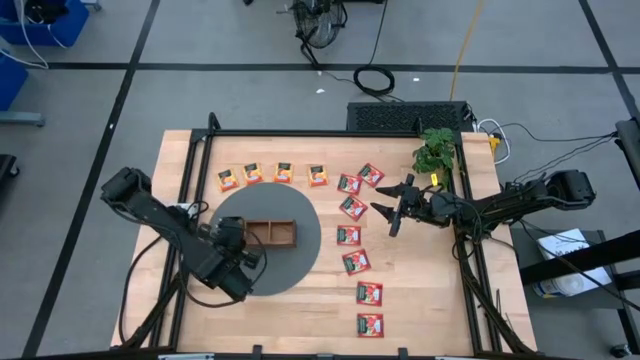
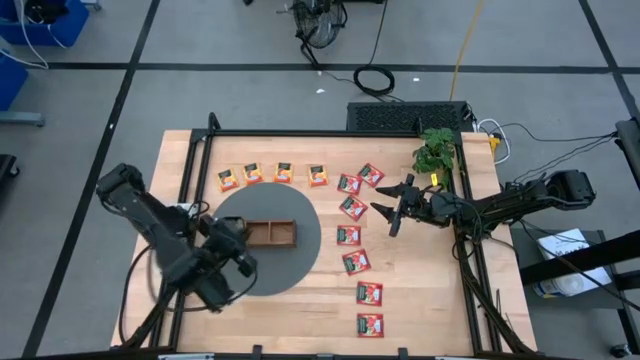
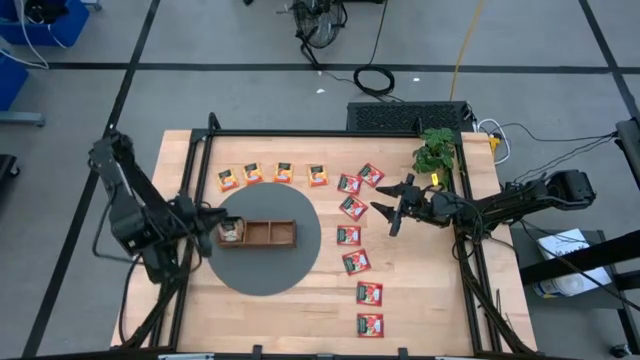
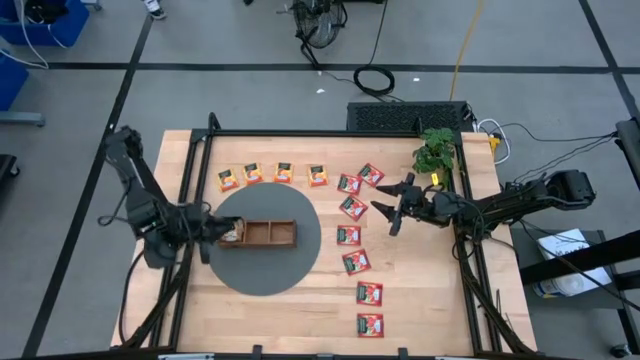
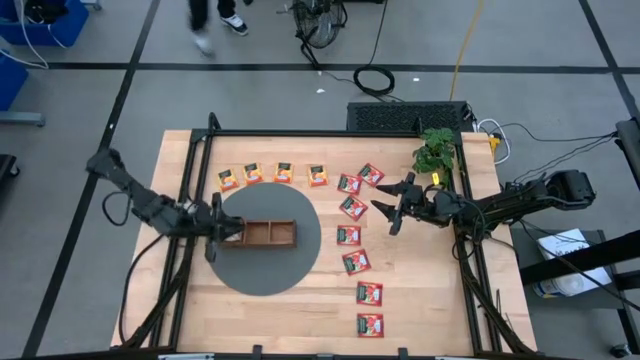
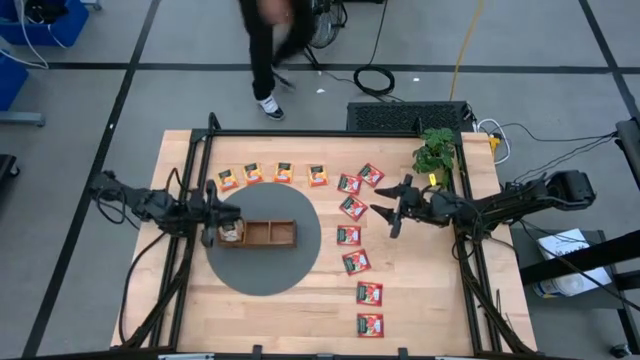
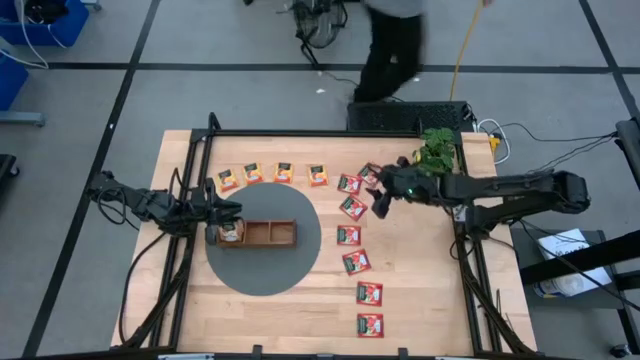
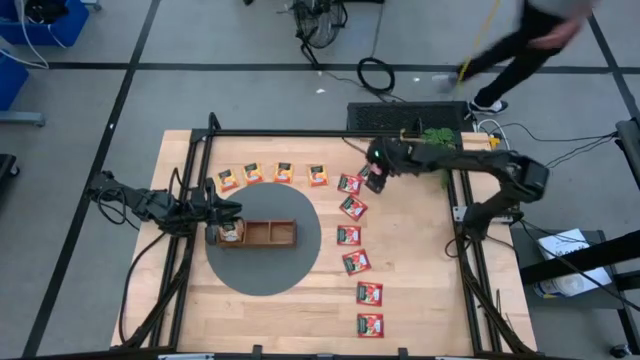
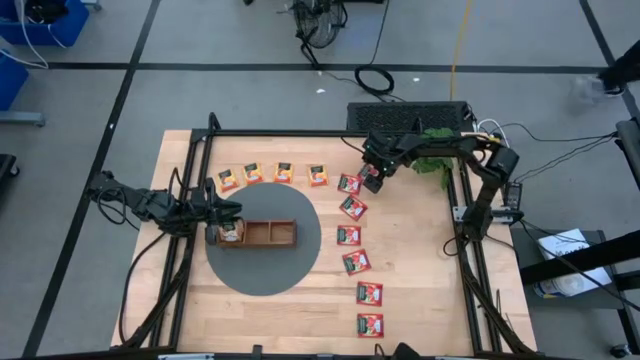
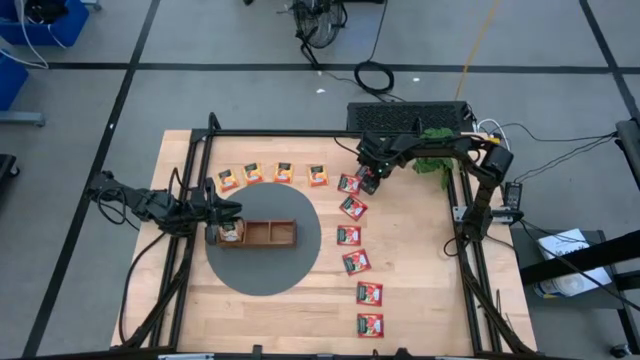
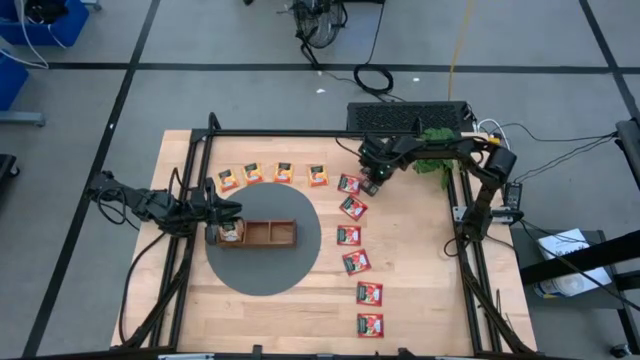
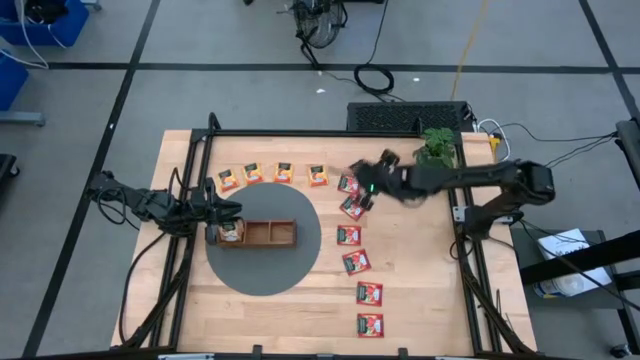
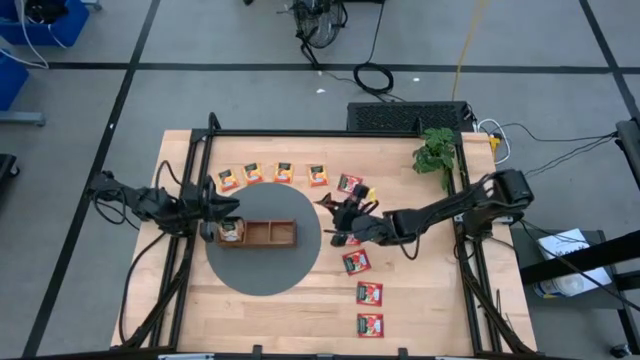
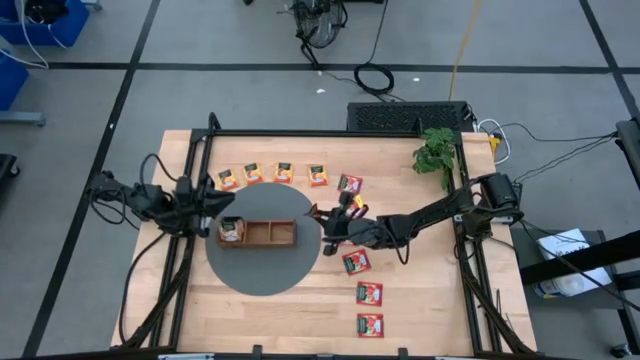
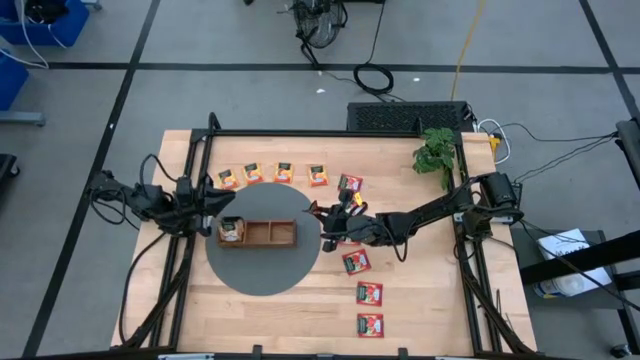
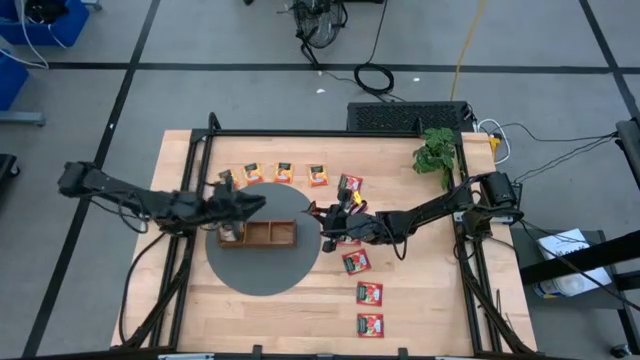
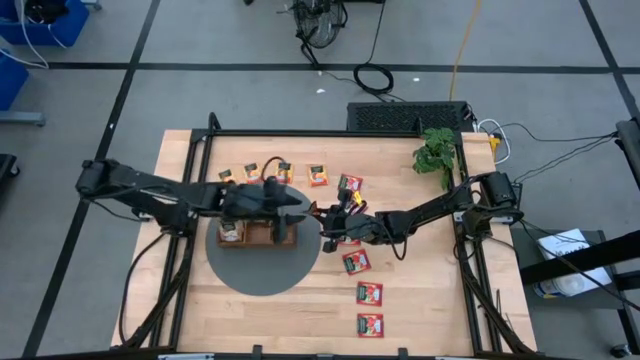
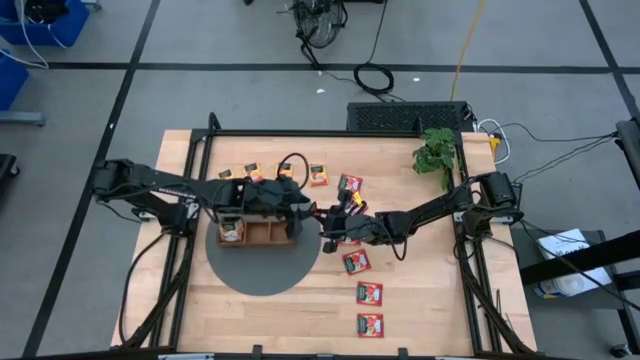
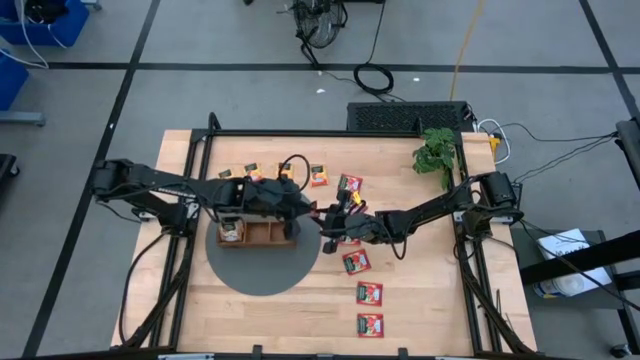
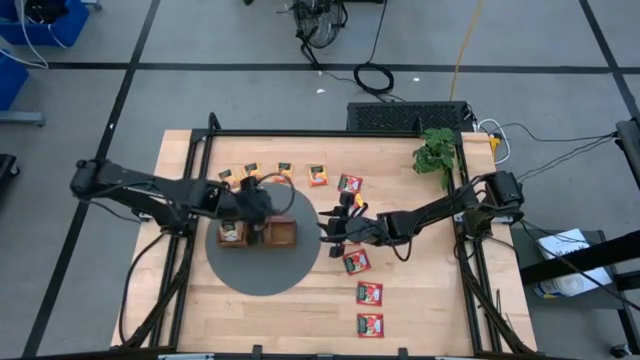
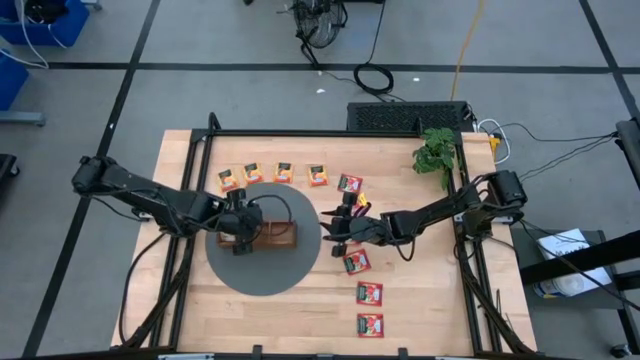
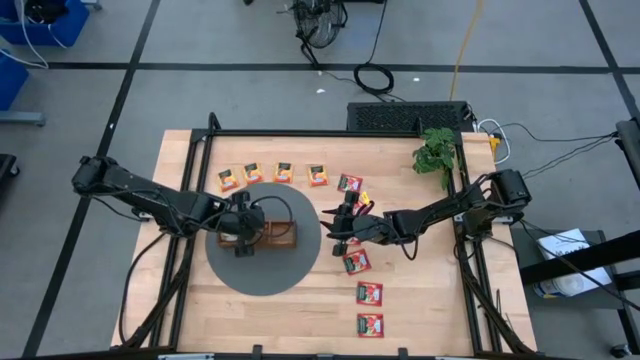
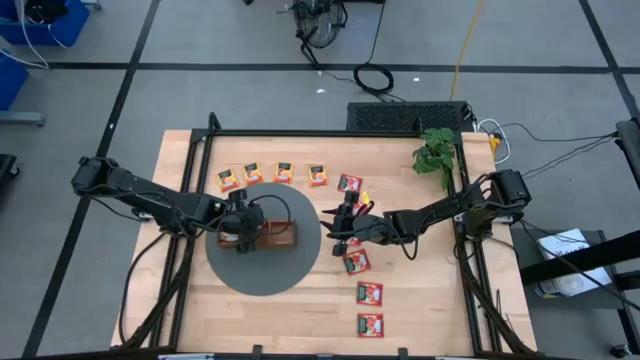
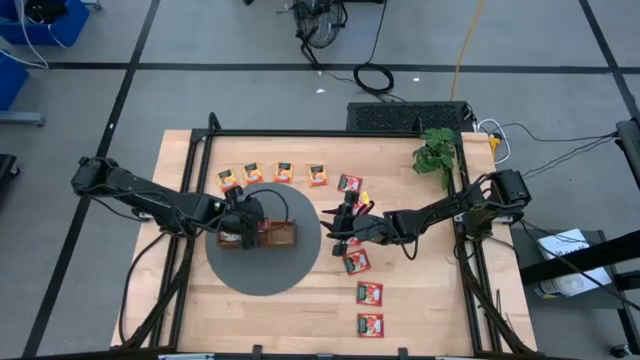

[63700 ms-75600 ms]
Task: Pick & Place Tea
Put the red tea bag into the middle section of the wooden organizer

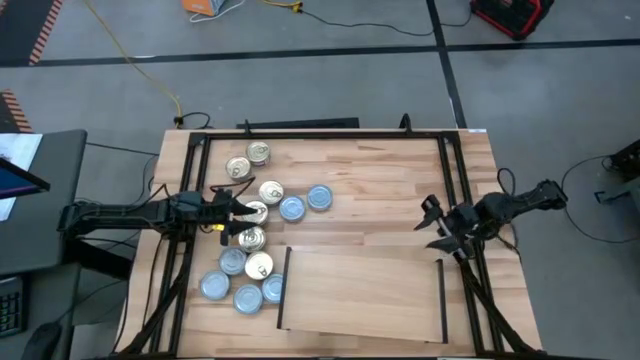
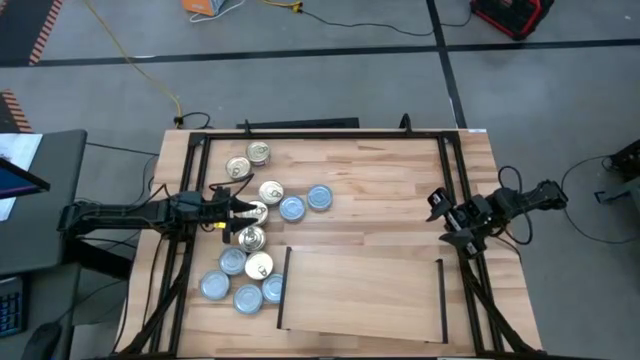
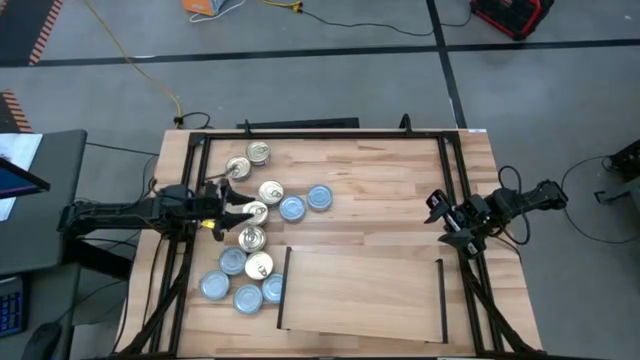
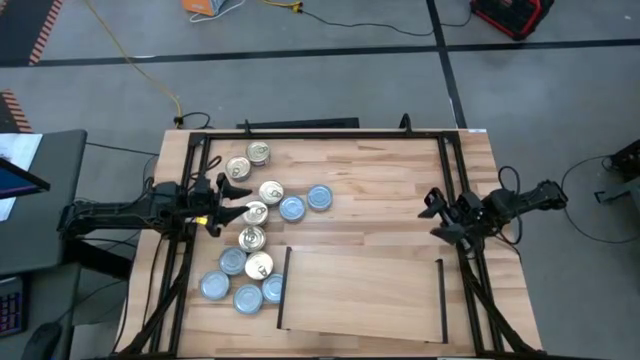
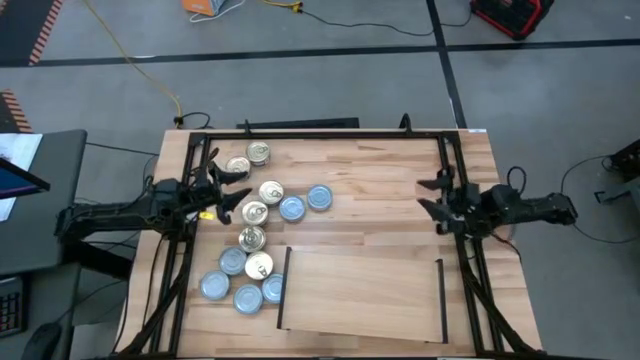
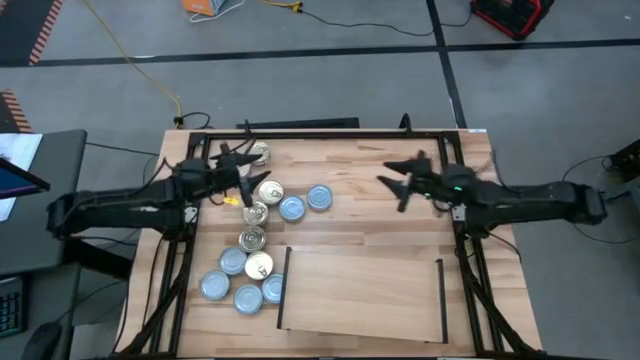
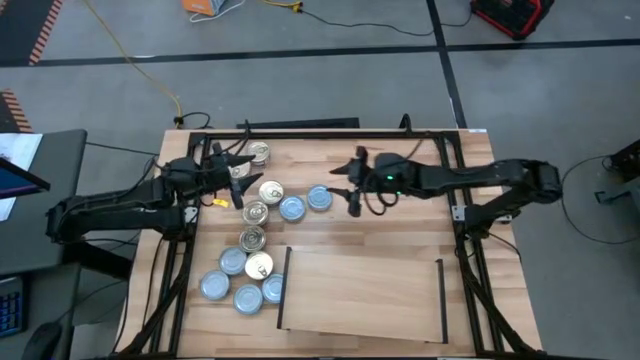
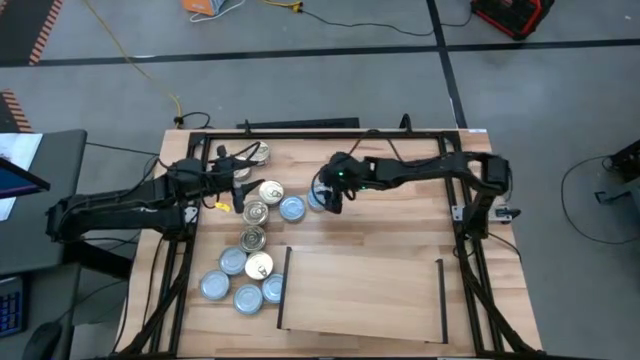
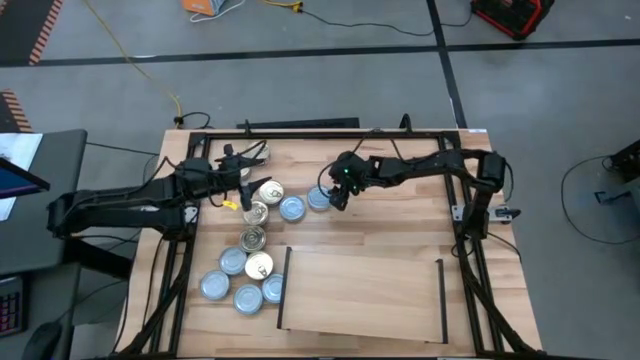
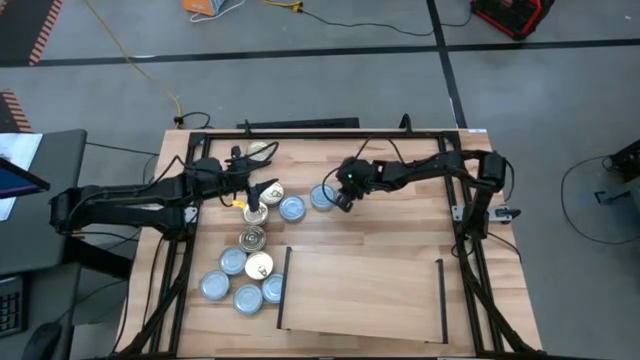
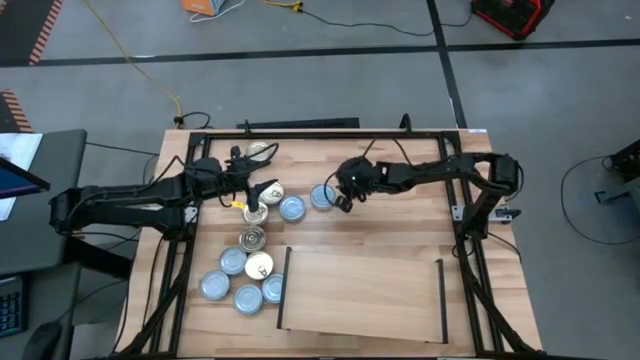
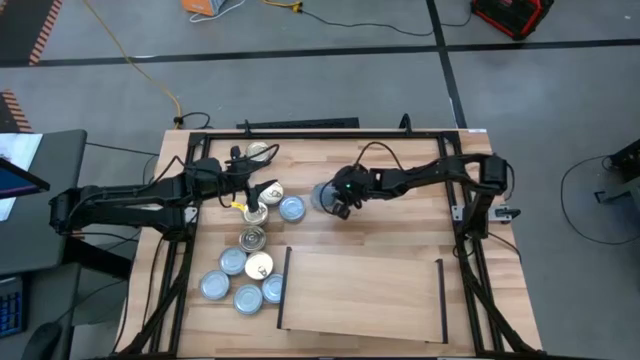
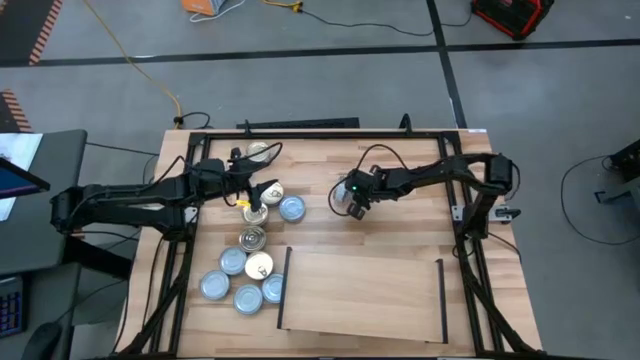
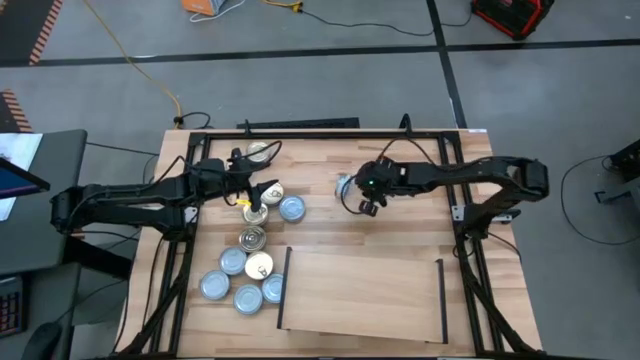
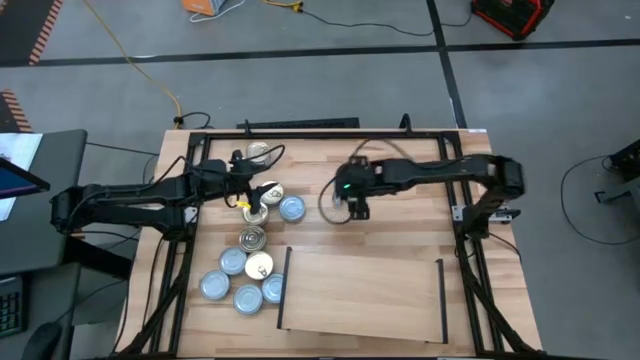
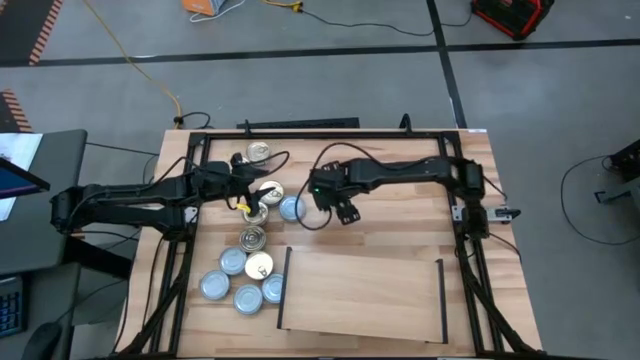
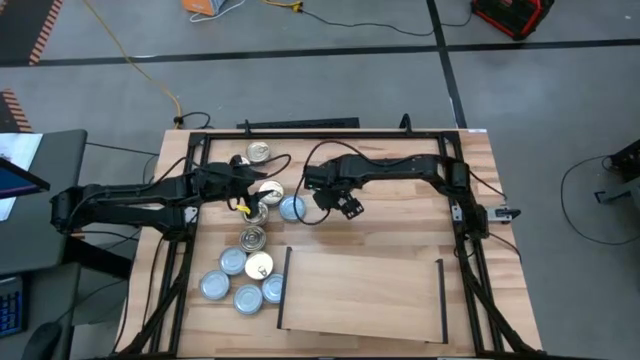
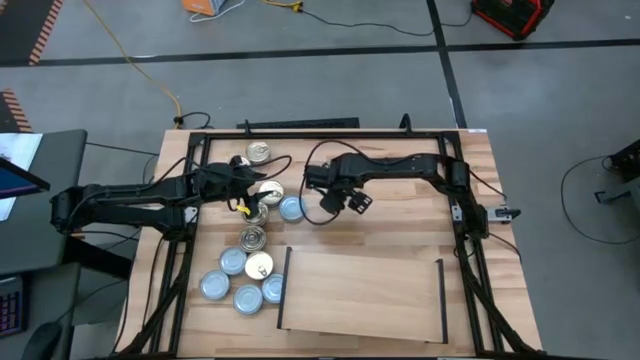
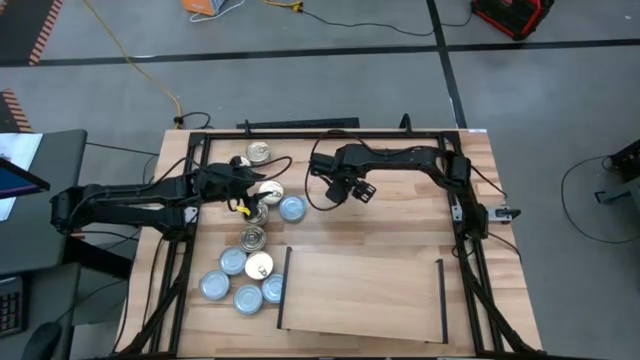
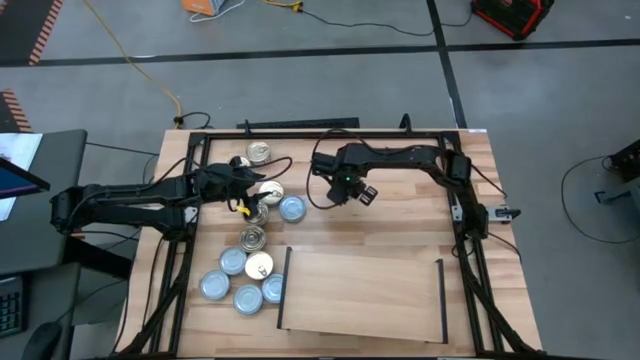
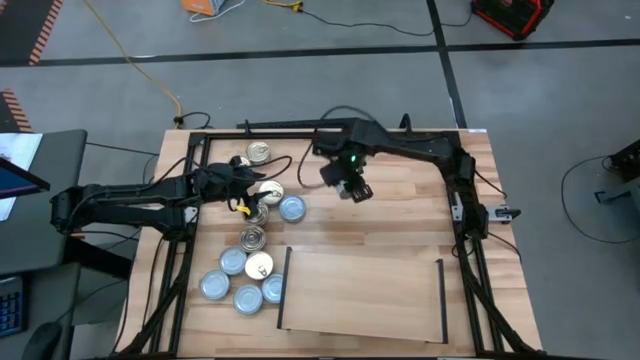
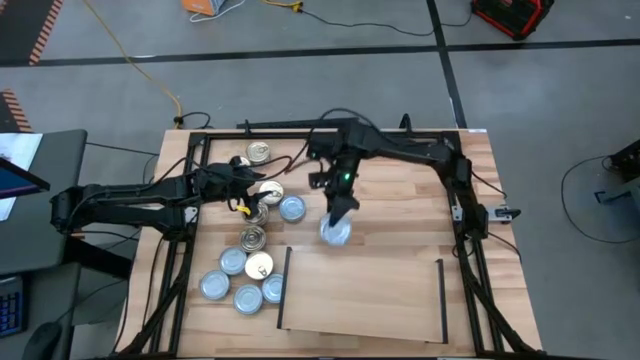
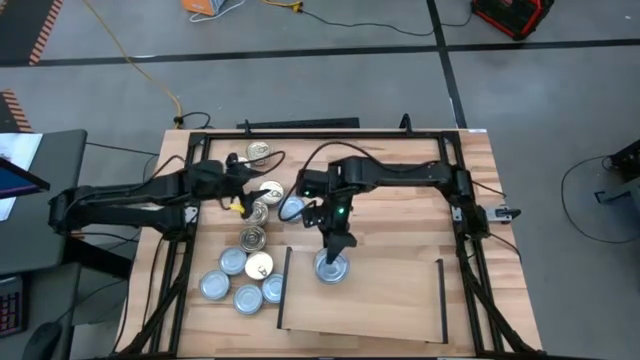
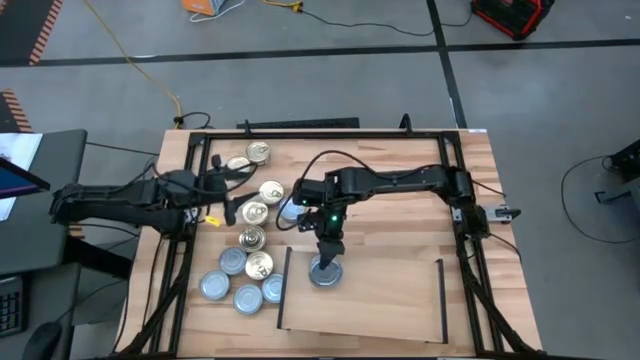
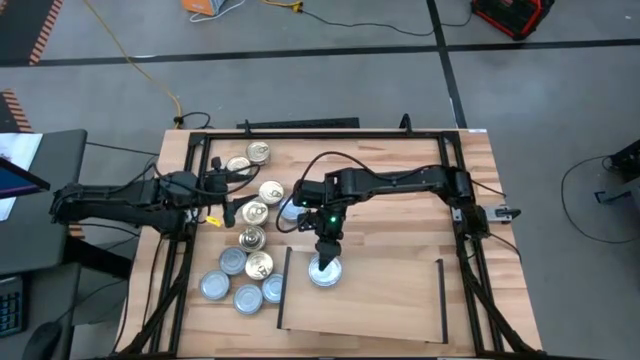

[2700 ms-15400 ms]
Task: Stack canned seafood by type on shelf
Put the green tuna can on the shelf
